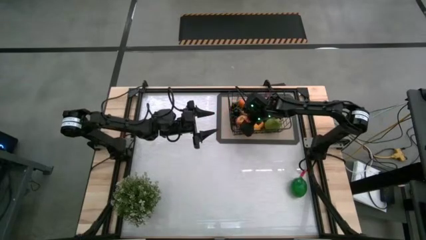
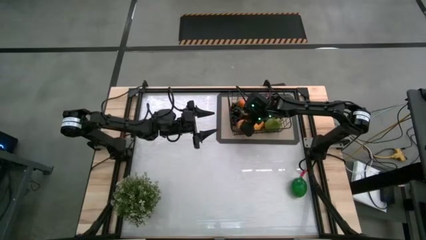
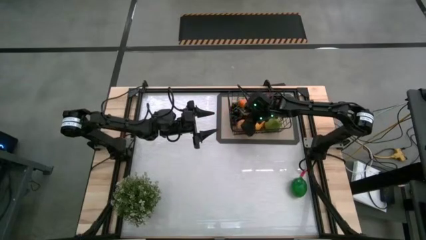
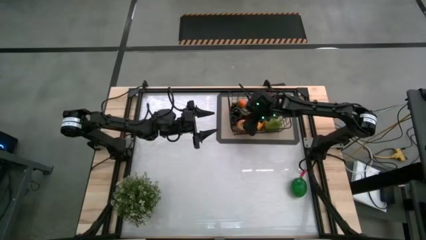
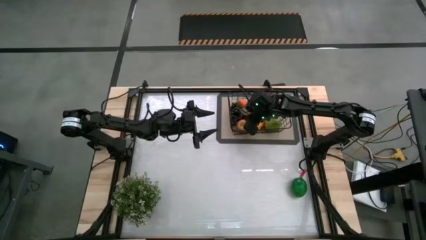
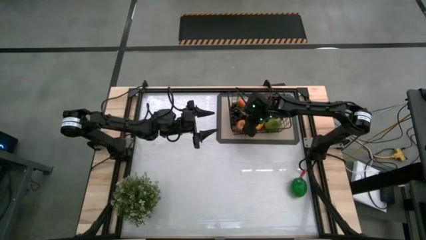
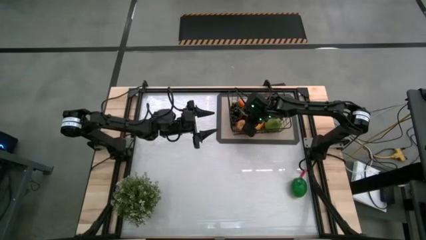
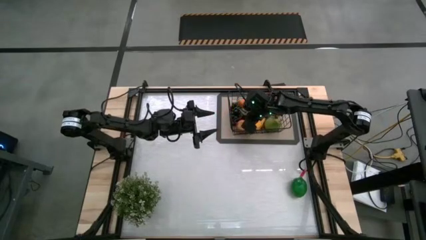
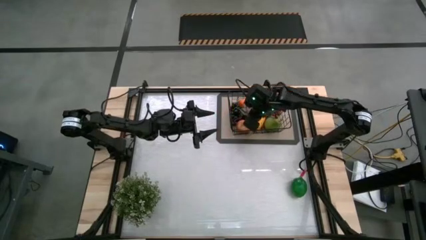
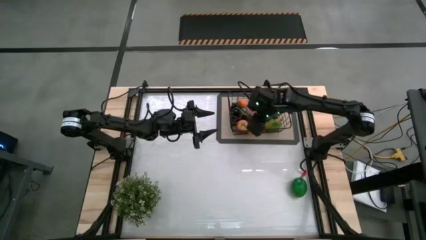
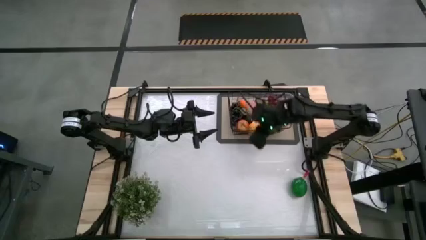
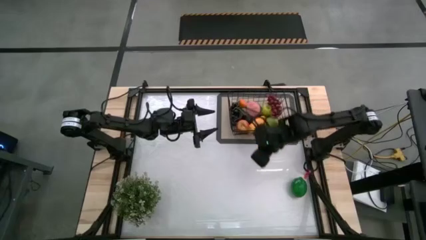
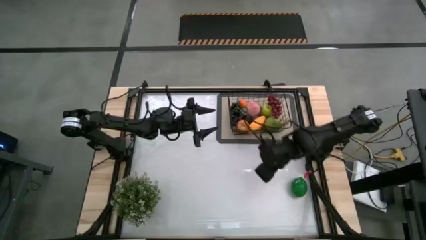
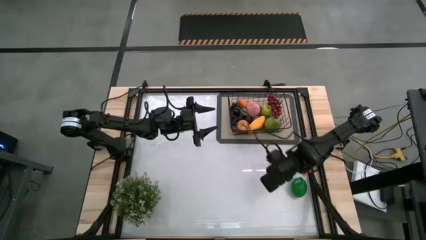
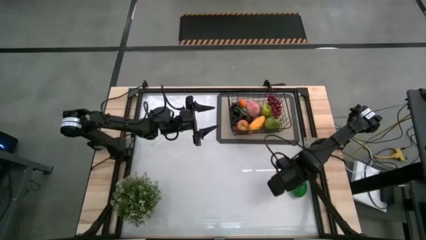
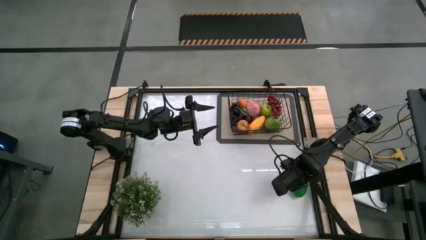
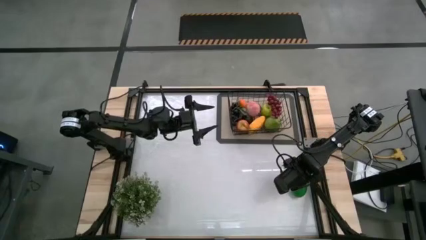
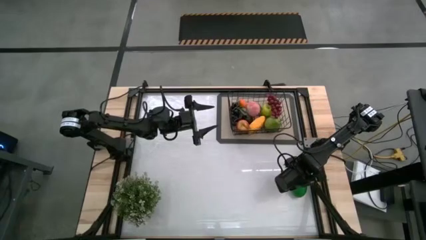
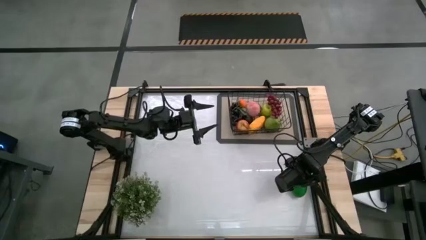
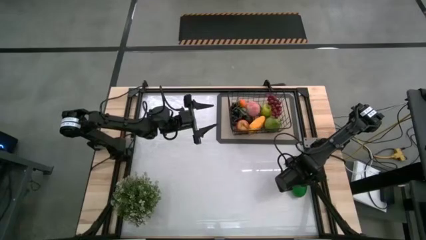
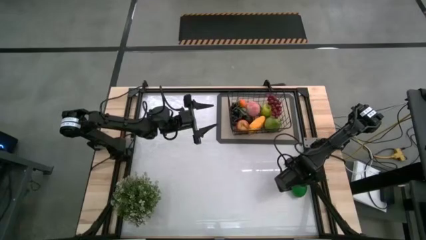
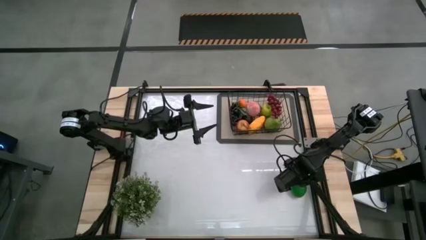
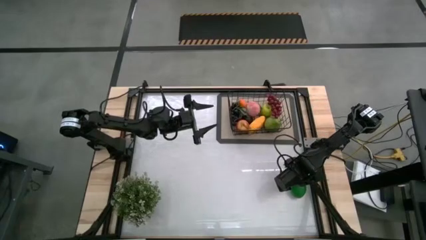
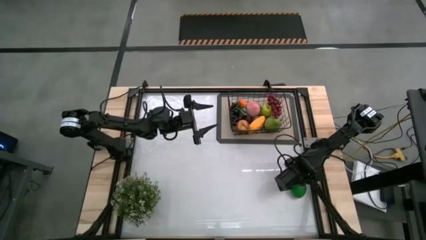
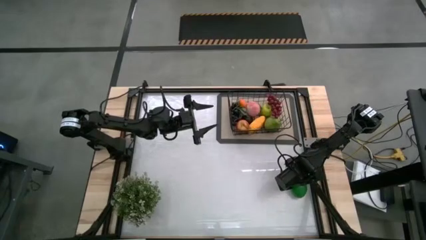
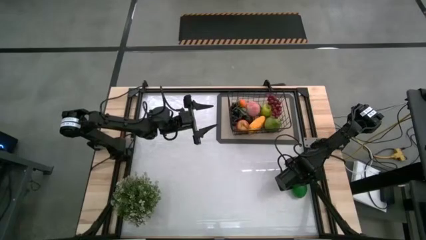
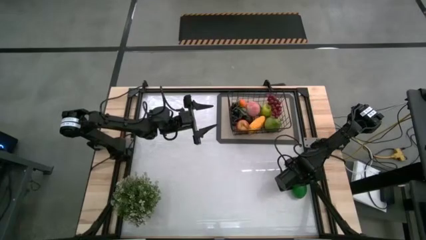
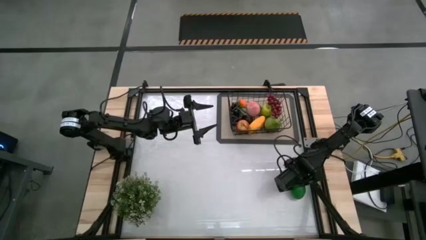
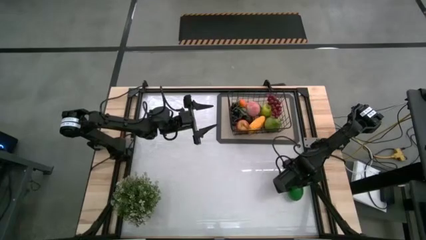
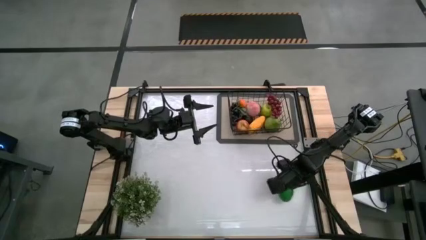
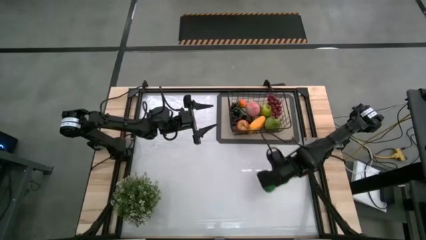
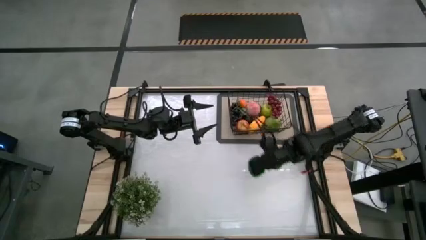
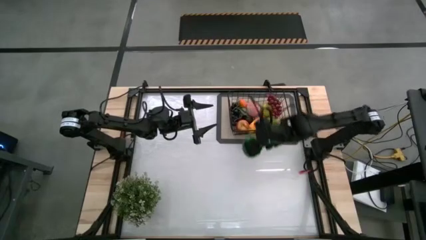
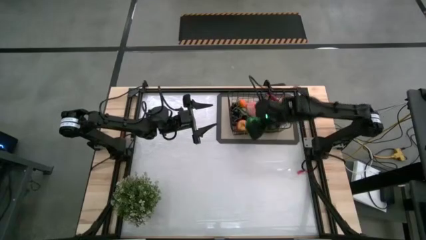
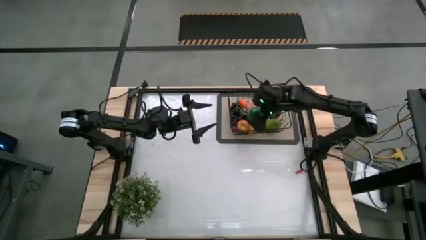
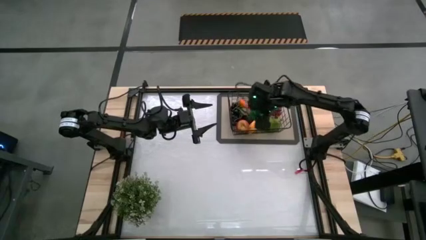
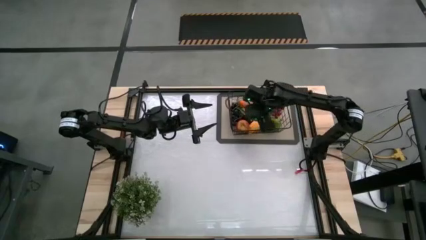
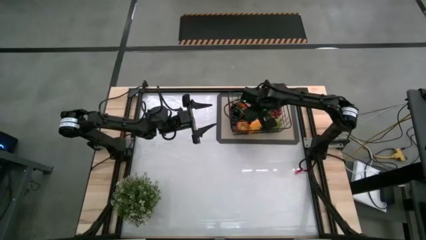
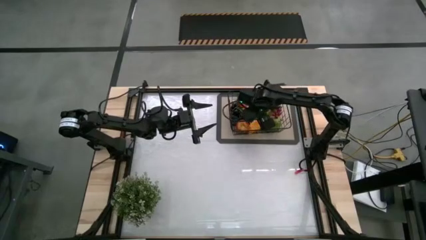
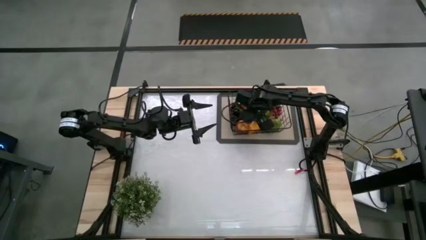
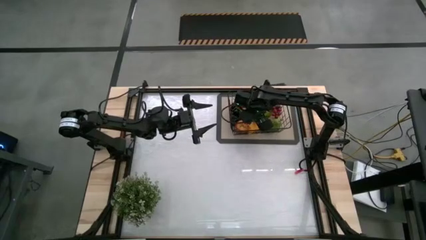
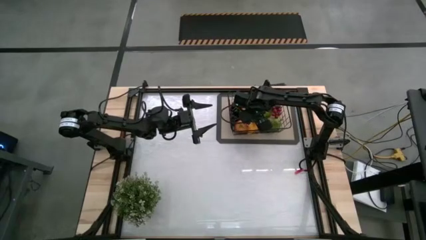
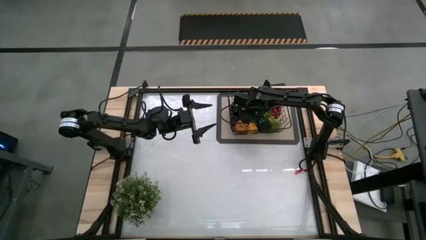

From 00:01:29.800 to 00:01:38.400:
Task: Build produce basket
Put the lime into the black basket

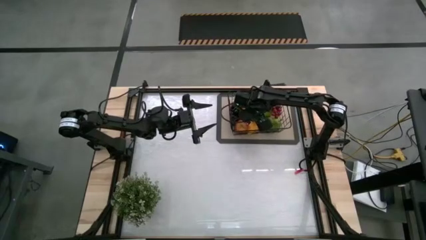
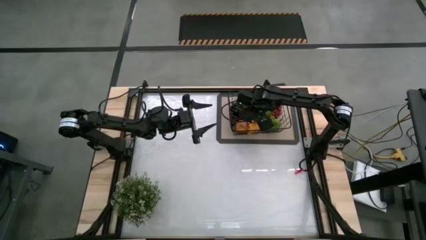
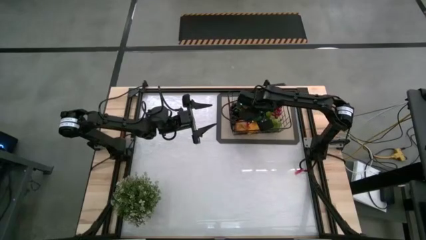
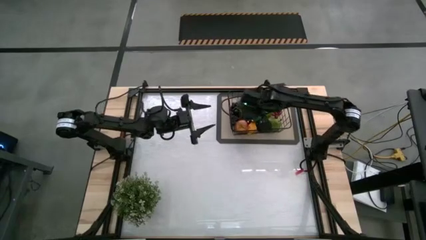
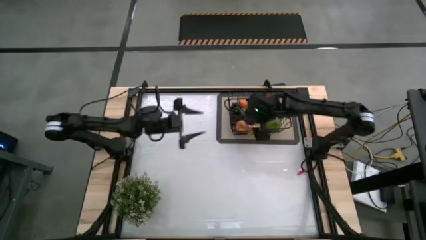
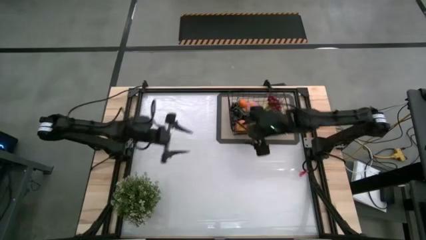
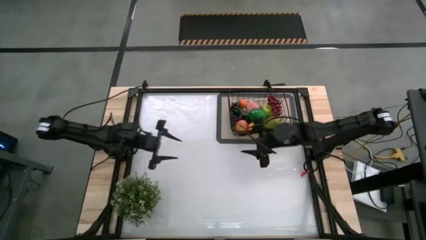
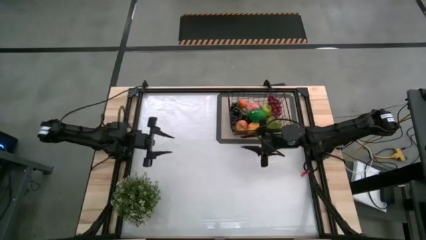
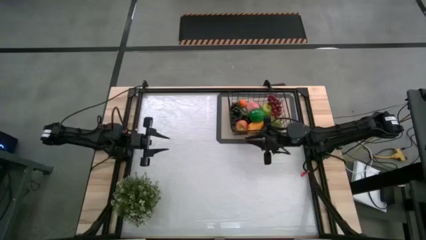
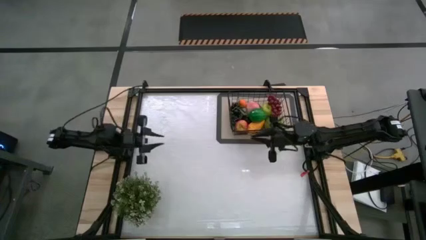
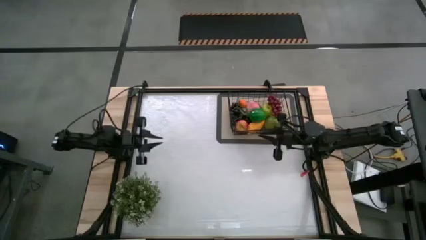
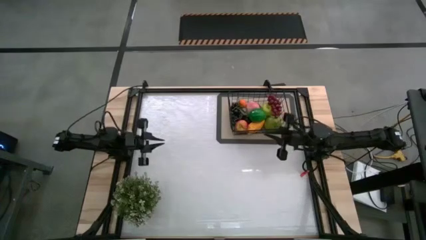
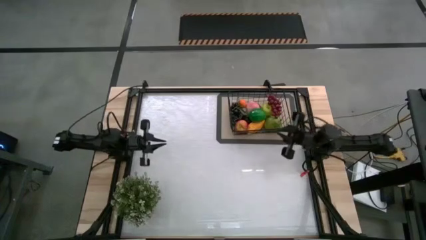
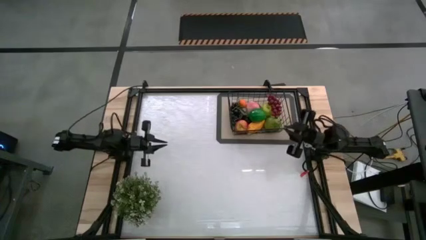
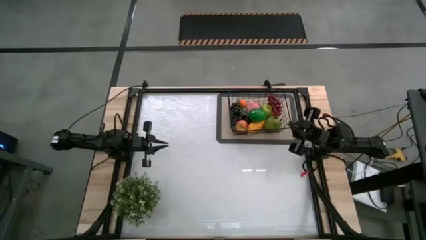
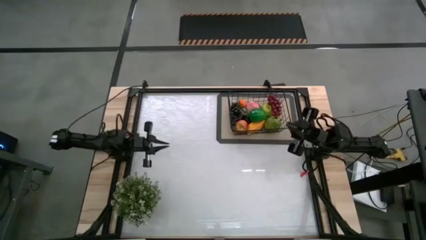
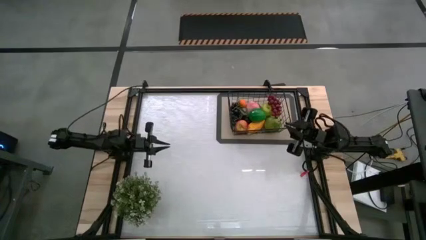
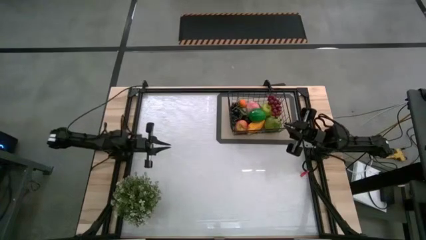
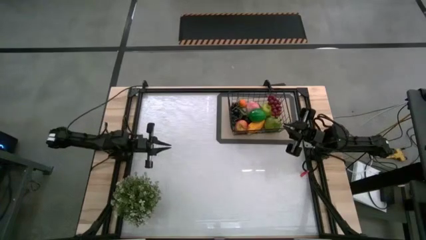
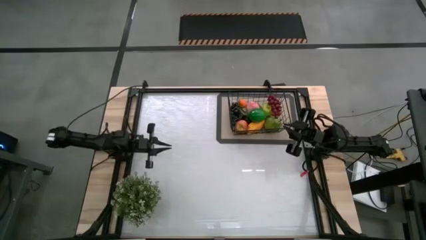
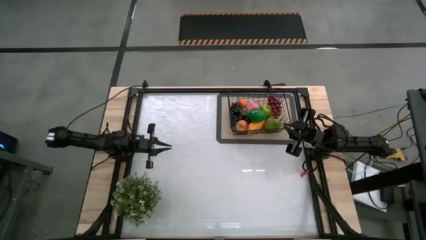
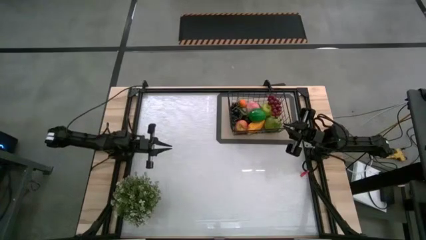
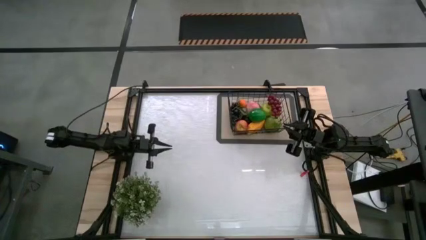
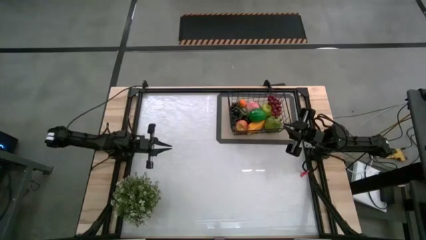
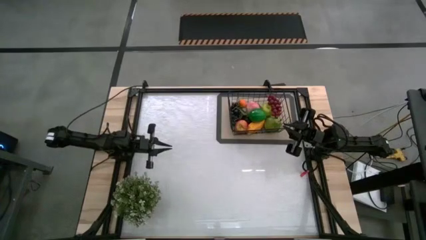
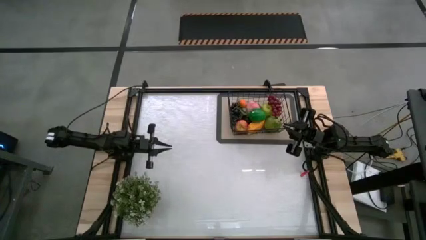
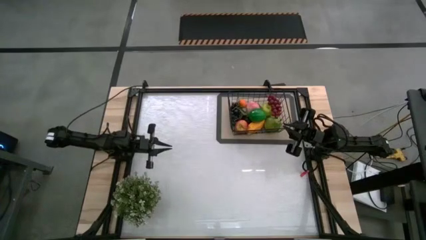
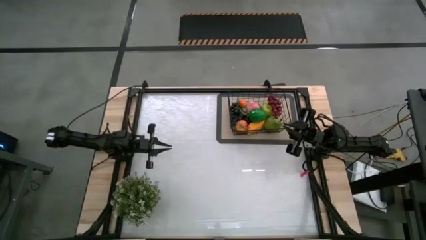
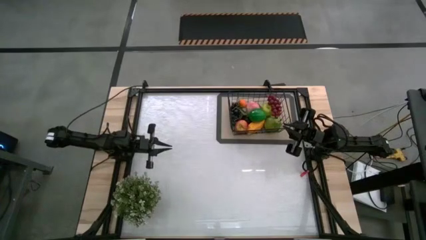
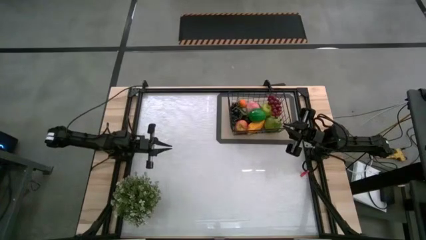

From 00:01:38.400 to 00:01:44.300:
Return to Home Position
